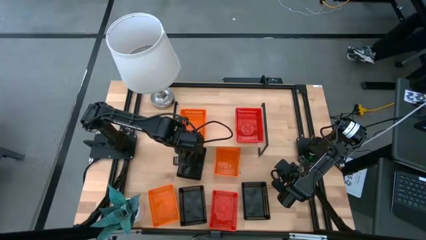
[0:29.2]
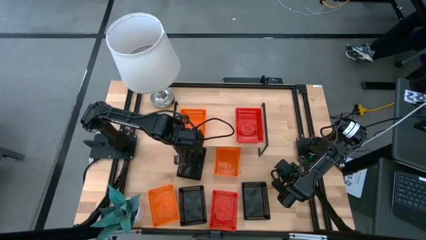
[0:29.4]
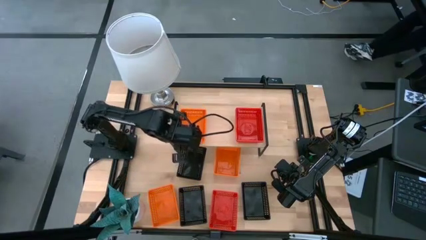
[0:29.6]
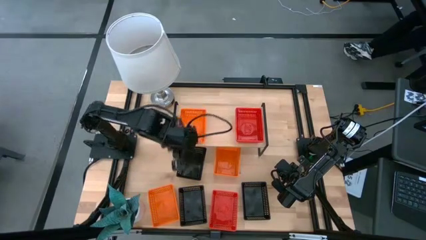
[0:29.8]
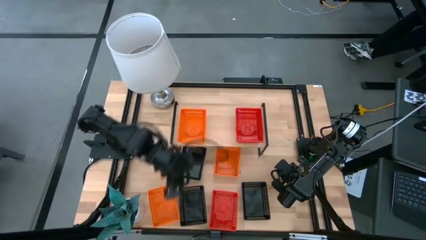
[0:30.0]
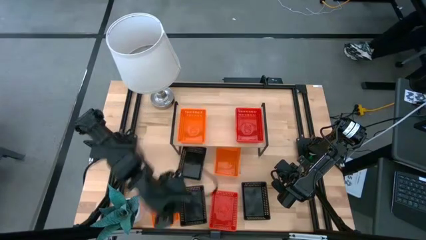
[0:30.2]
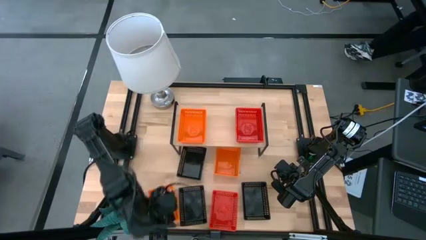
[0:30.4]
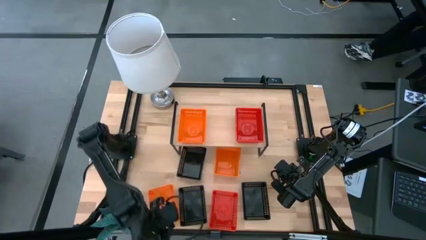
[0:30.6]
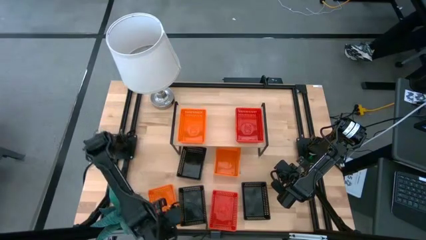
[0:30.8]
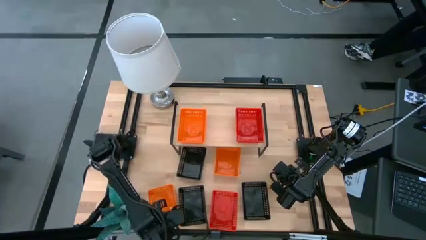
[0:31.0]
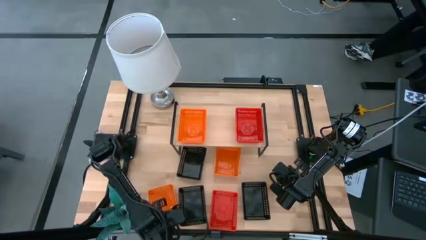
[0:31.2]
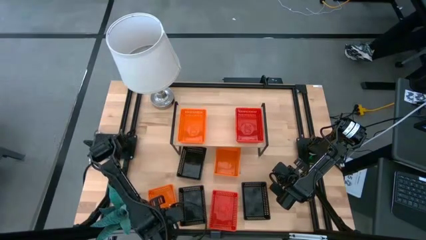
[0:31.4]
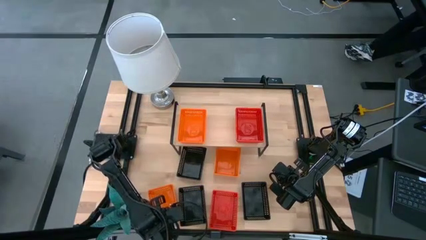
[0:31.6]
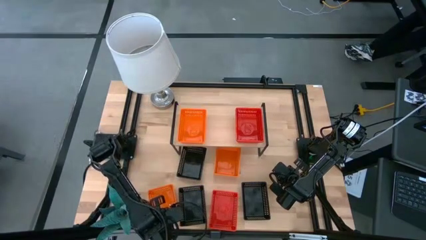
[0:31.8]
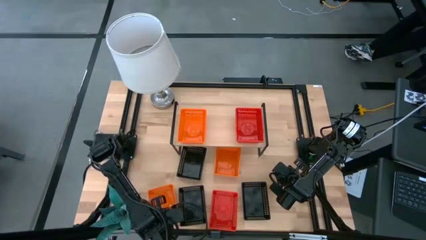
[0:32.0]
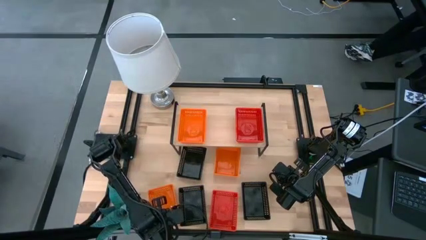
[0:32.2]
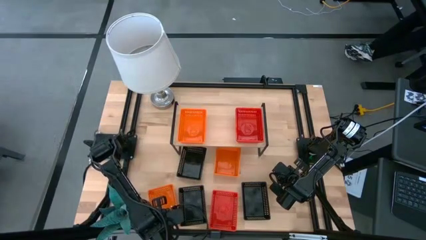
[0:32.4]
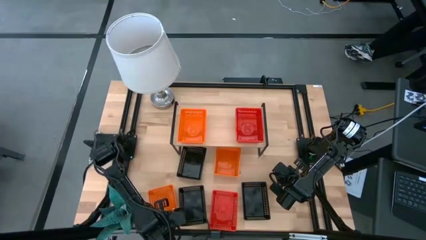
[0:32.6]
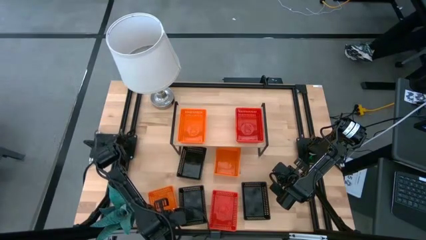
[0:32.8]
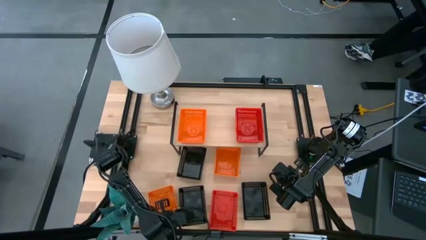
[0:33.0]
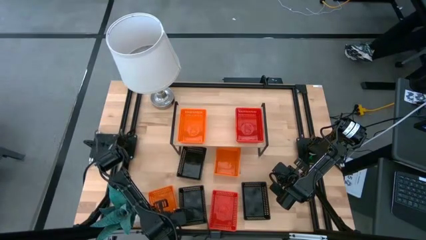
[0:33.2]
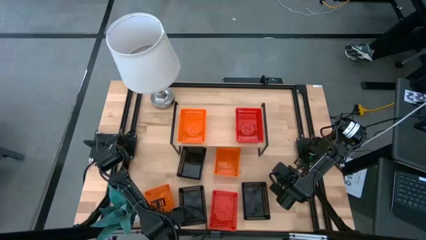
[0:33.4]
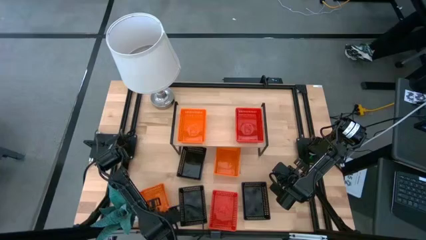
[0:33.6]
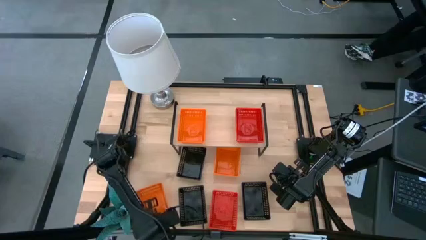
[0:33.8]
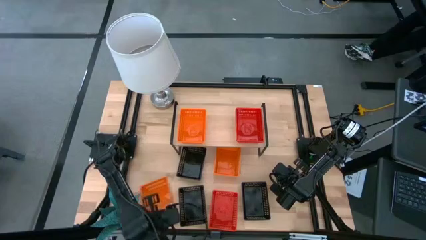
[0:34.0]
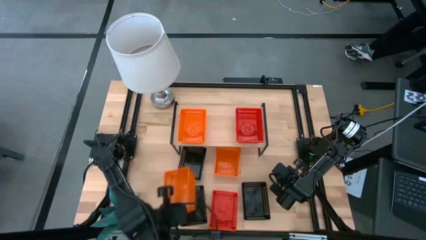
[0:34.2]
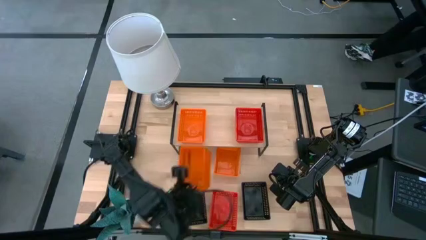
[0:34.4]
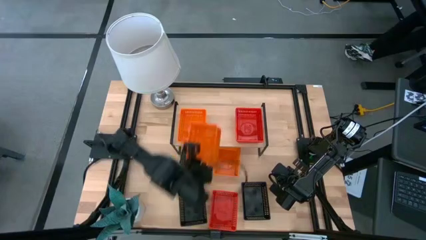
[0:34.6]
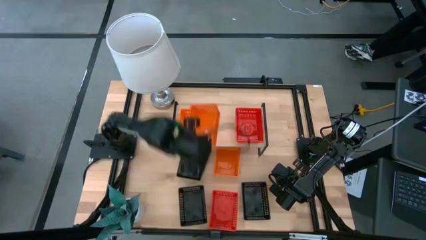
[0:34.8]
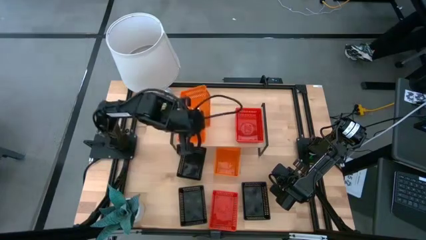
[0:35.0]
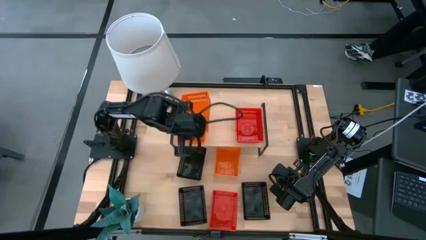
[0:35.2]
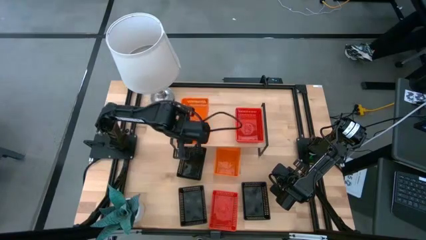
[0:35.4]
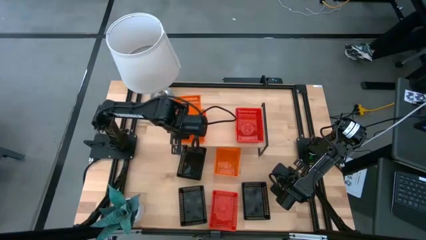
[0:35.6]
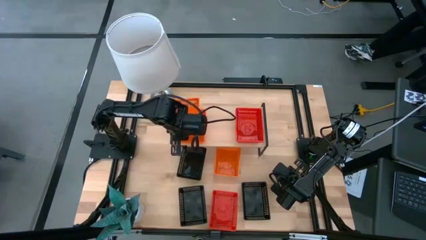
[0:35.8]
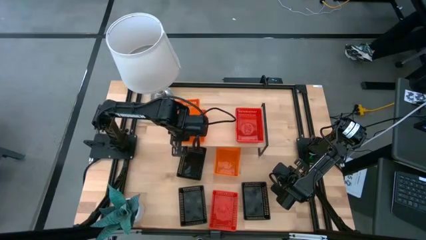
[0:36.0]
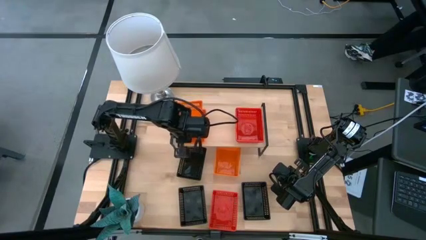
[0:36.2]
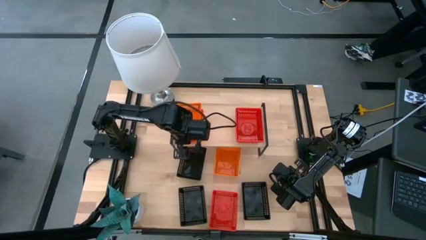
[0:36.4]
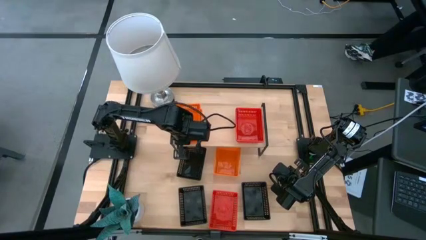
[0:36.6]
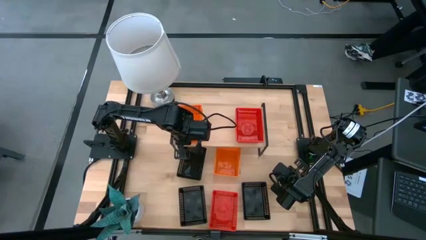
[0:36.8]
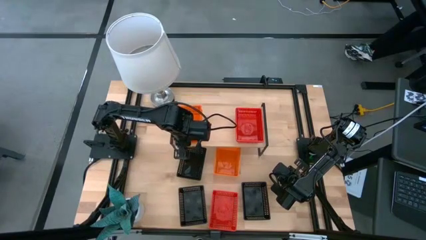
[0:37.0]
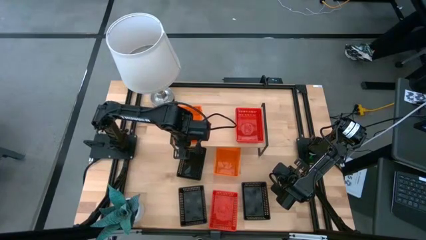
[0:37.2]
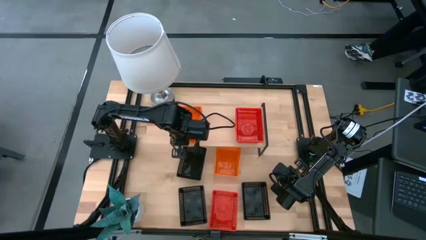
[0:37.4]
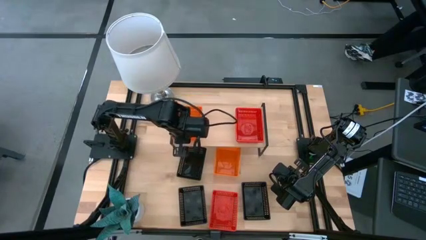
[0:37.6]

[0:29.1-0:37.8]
Task: Stack baskets on shelf by color
Stack the bottom orange bin on top of the orange bin on the shelf

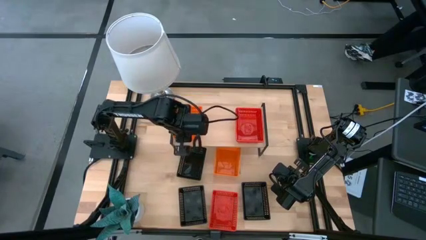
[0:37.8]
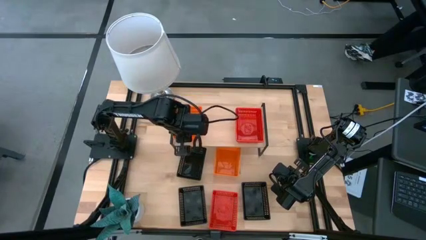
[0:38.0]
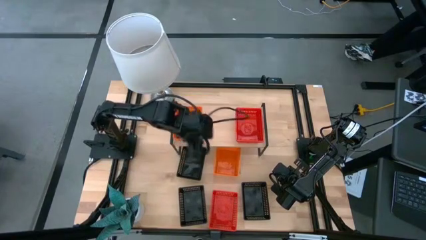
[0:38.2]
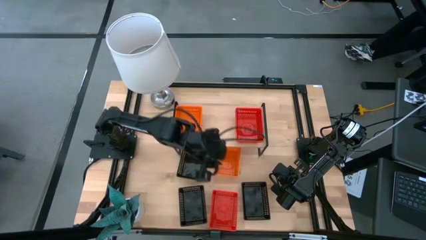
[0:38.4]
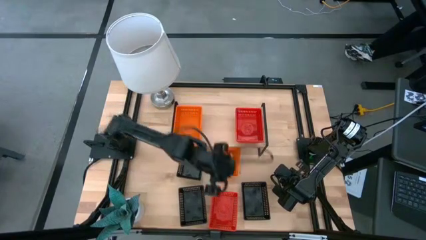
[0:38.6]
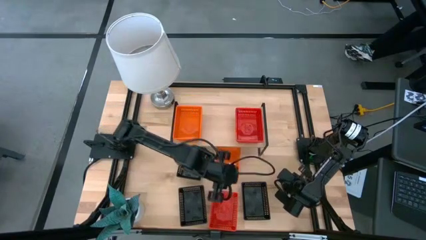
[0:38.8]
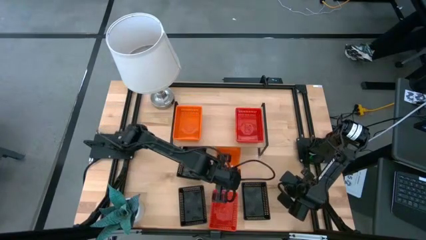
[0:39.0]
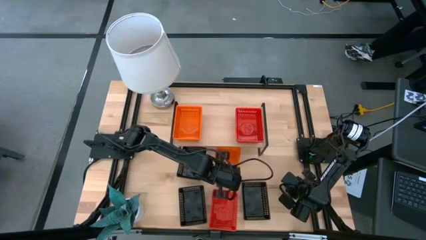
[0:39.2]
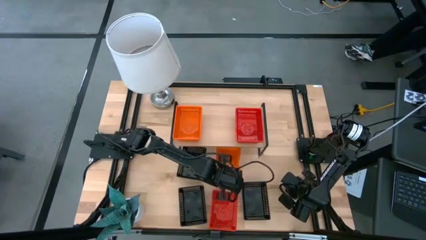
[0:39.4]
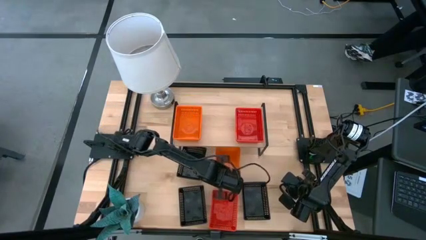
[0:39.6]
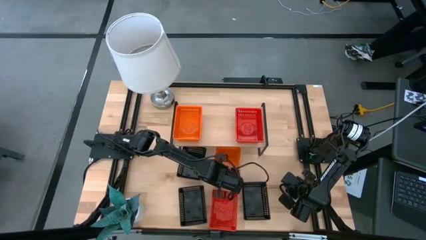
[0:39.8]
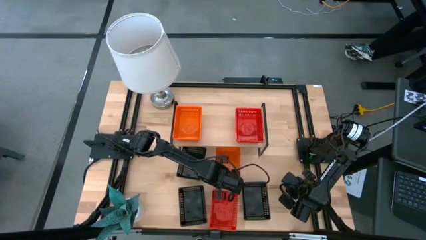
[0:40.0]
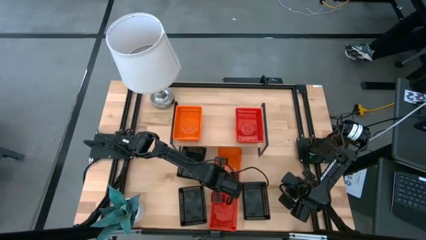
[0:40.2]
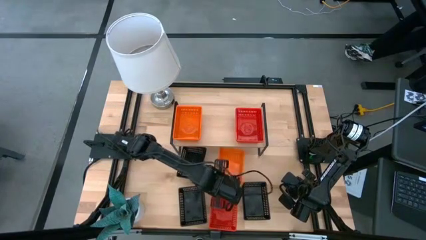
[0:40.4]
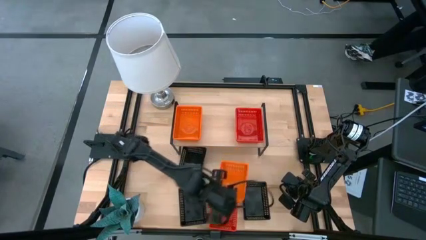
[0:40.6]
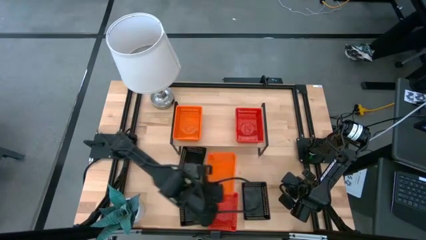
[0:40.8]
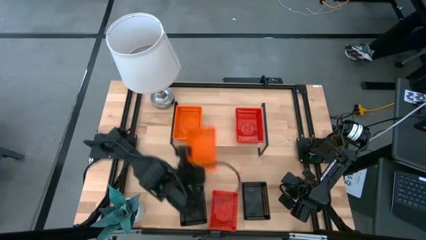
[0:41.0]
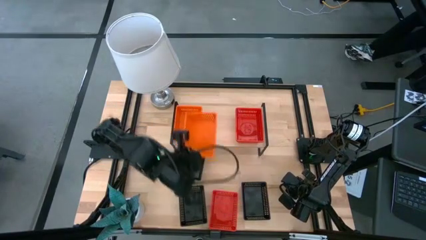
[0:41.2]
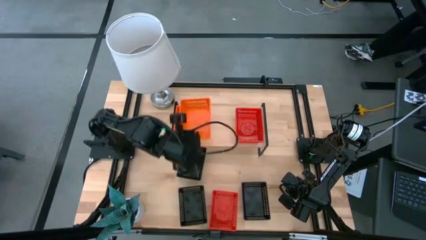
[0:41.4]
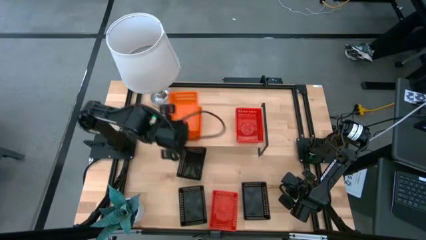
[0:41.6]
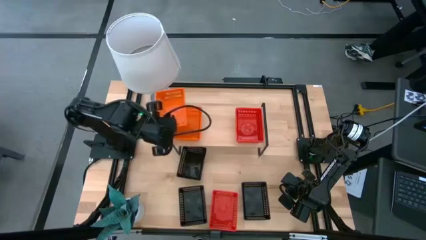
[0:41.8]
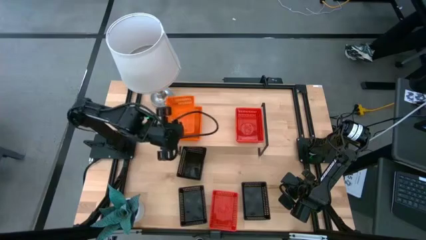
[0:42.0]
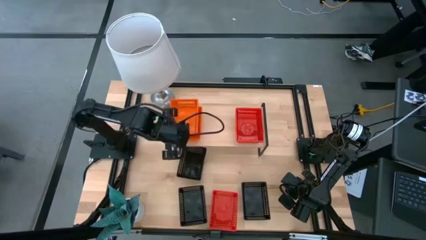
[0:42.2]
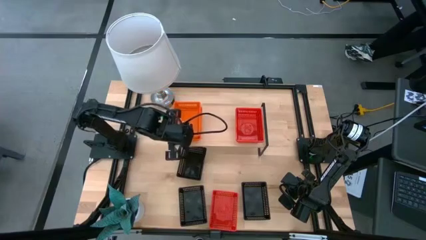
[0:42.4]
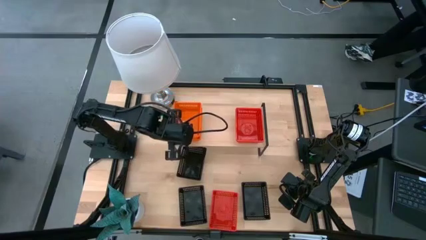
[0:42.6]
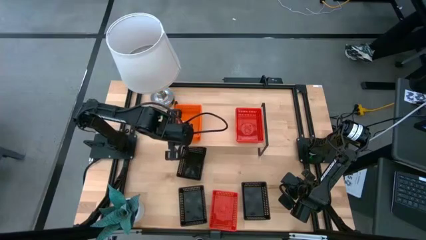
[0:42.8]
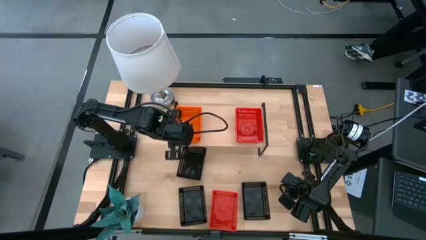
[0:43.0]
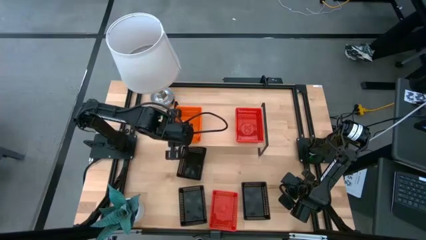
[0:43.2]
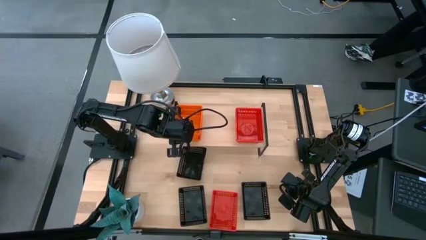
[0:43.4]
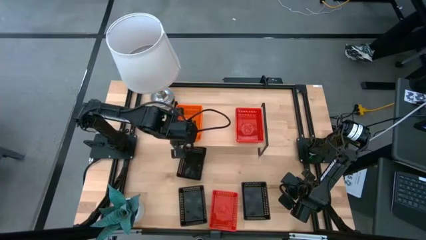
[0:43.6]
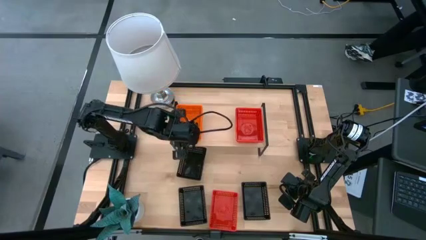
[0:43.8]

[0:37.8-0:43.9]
Stack the orange bin on top of the orange bin on the shelf

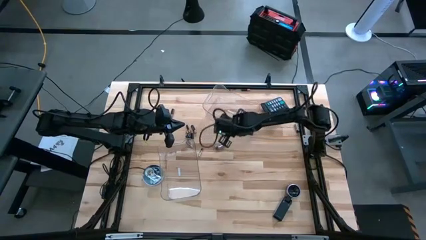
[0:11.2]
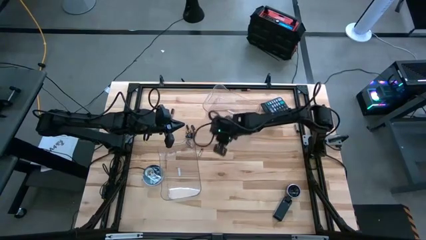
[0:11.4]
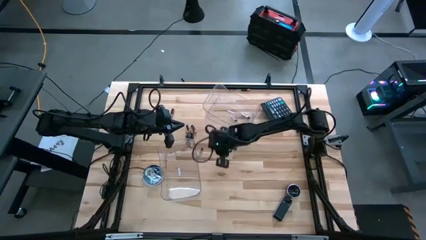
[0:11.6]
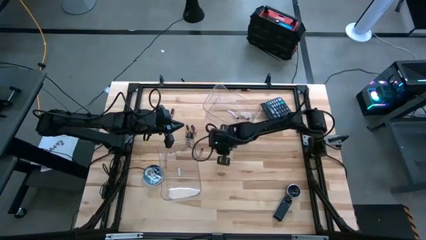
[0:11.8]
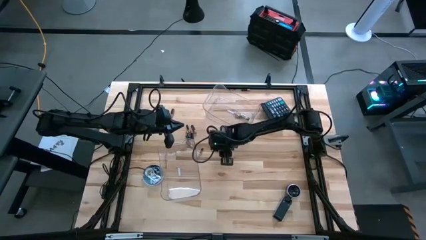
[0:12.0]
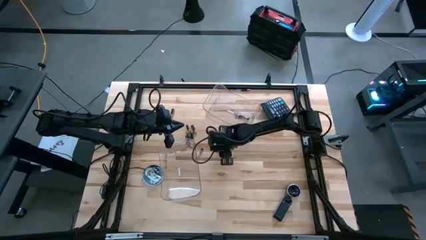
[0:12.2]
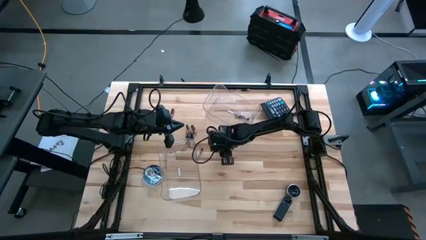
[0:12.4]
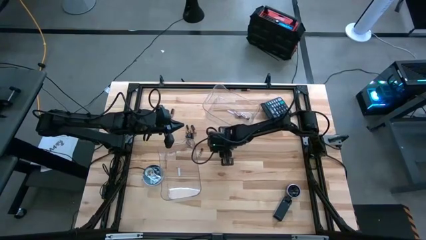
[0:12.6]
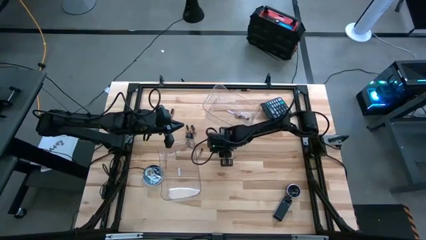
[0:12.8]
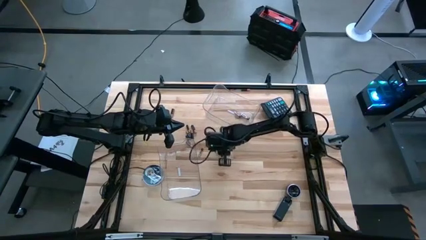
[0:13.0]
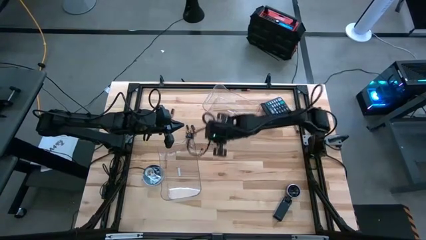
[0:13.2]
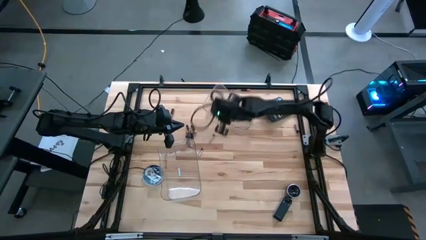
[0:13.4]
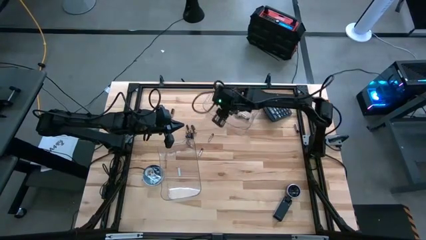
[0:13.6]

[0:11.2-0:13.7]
Task: Sort batteries
Put the silver battery into the top transparent bin

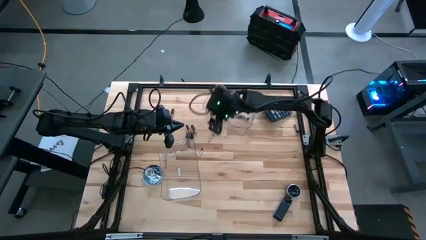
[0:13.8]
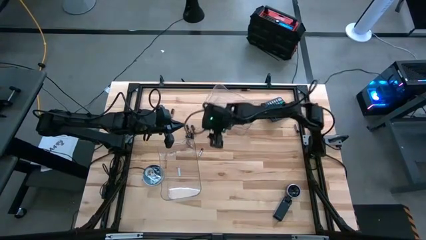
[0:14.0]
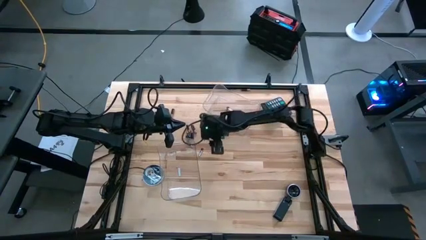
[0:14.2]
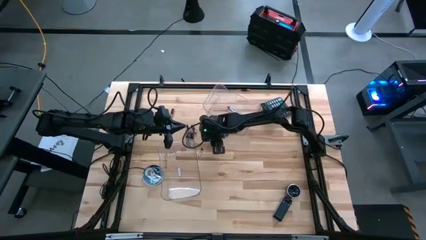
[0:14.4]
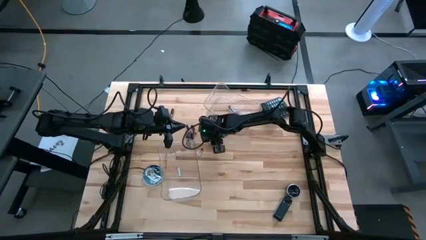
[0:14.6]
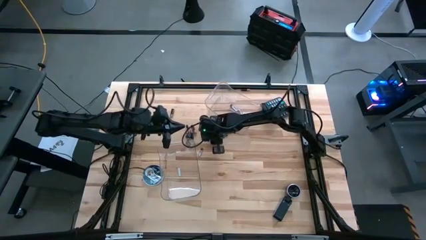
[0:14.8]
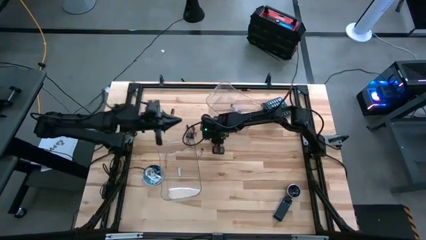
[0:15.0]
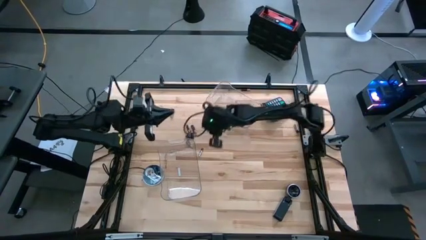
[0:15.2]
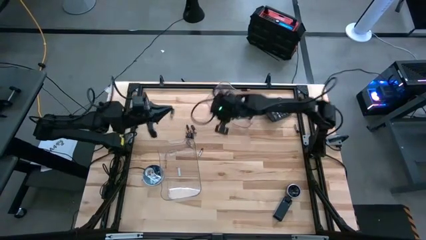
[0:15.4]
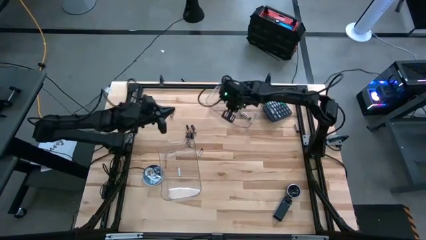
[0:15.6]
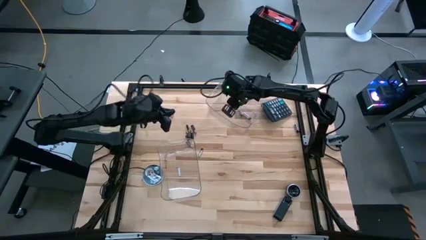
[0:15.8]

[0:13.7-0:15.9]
Put the silver battery into the top transparent bin
